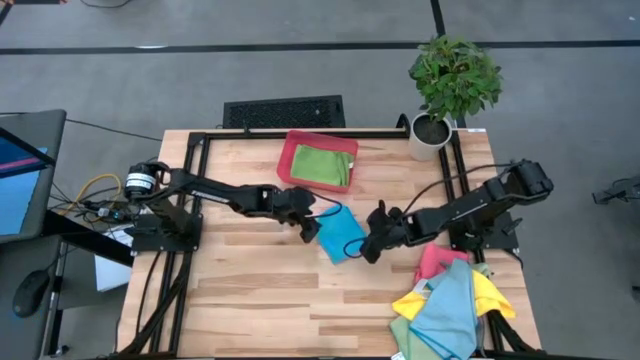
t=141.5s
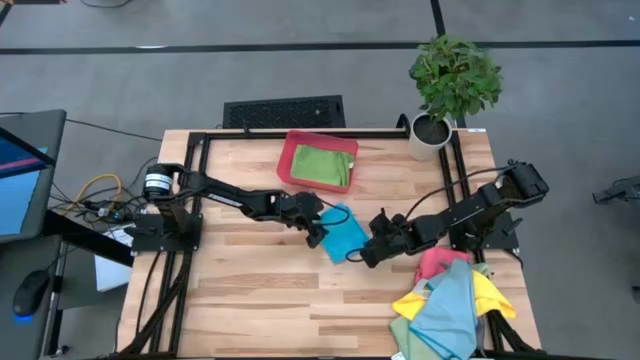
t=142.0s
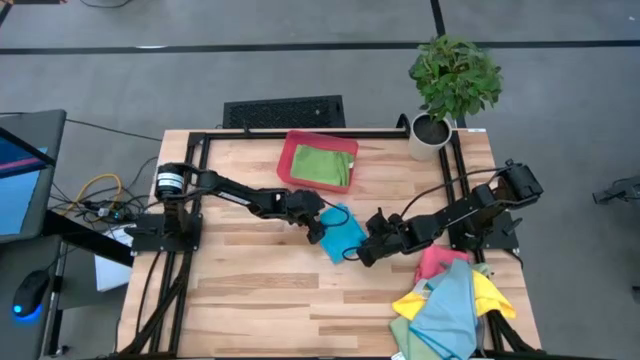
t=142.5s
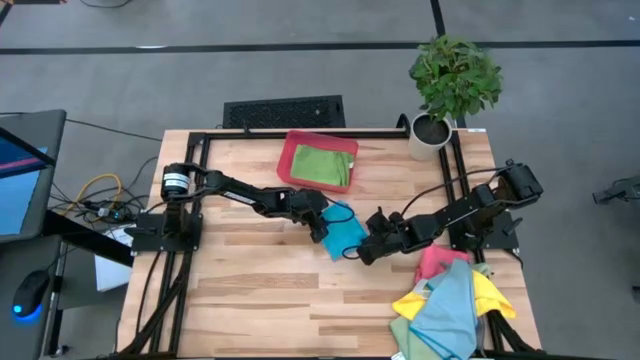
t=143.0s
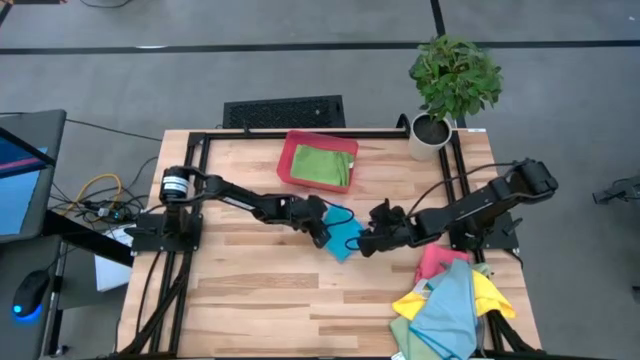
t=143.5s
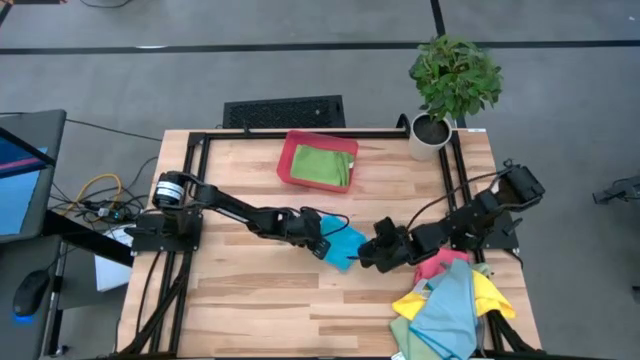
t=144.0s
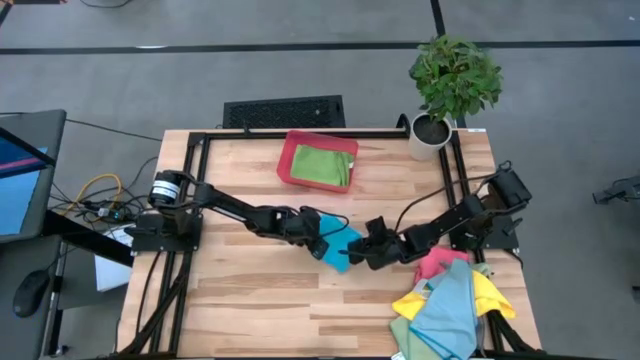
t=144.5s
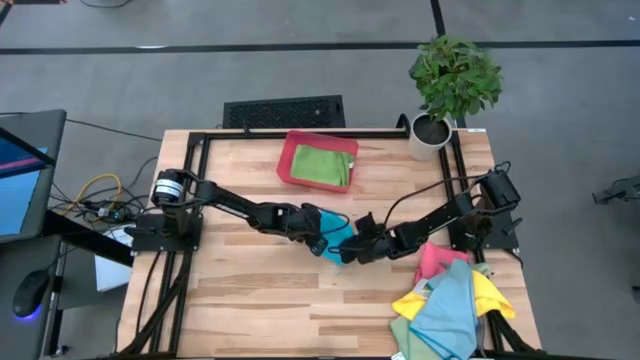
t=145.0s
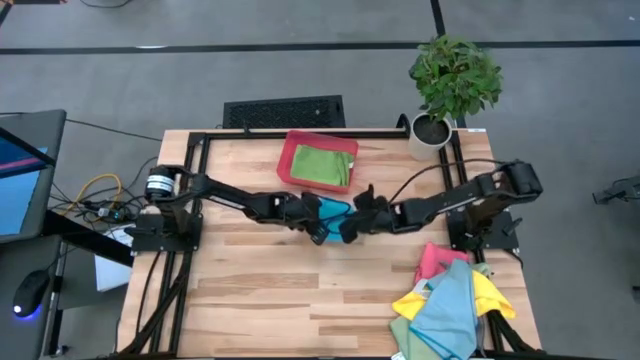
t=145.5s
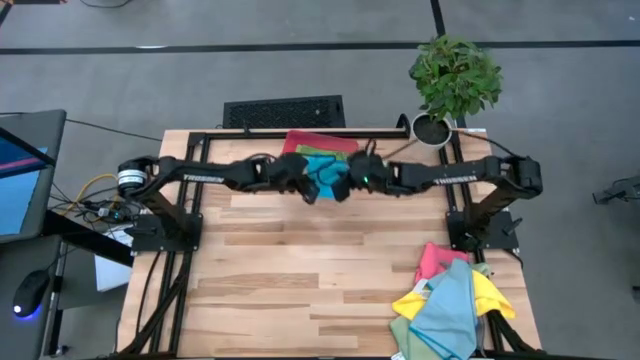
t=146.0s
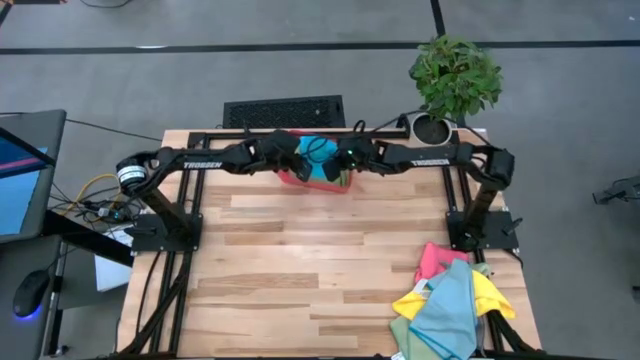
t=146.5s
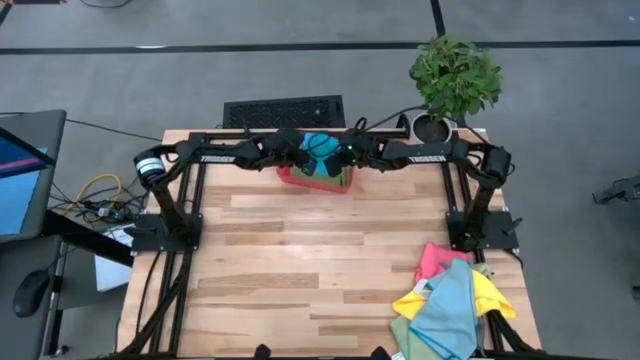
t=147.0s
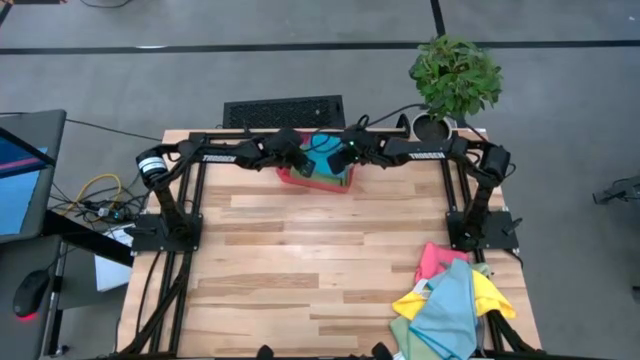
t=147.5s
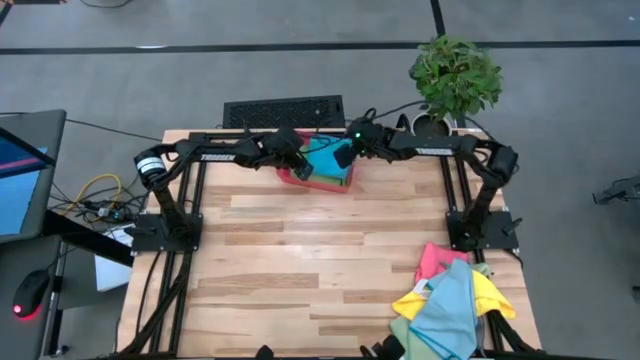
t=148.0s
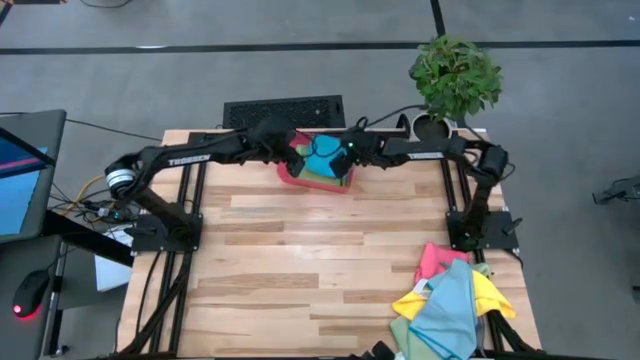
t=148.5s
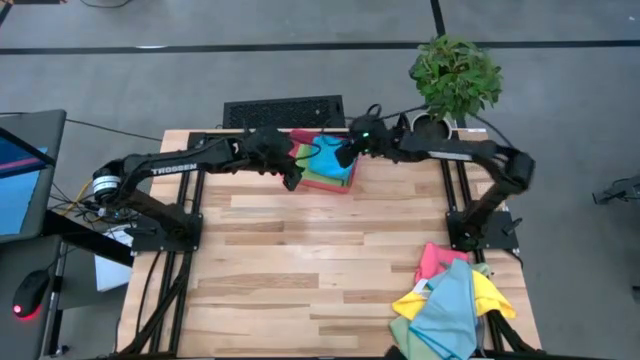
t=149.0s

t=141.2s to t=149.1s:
Task: Fold microfiber towels
Put the blue microfiber cloth into the red bin

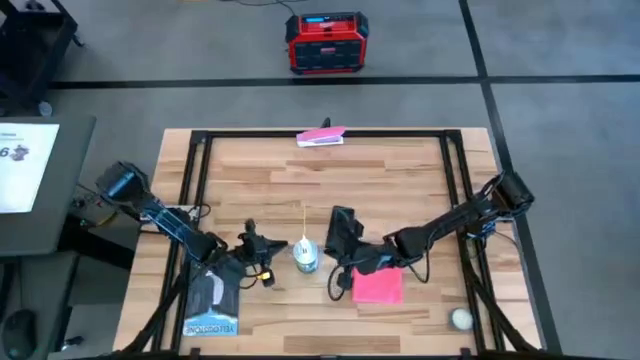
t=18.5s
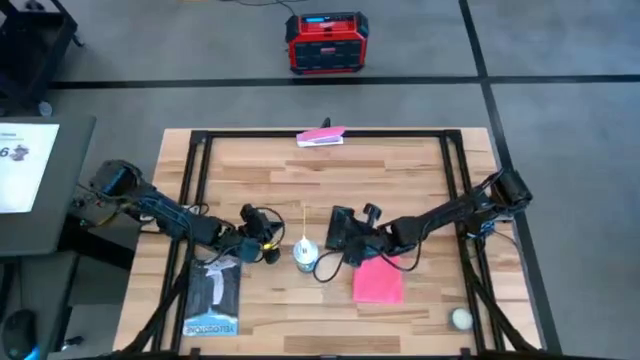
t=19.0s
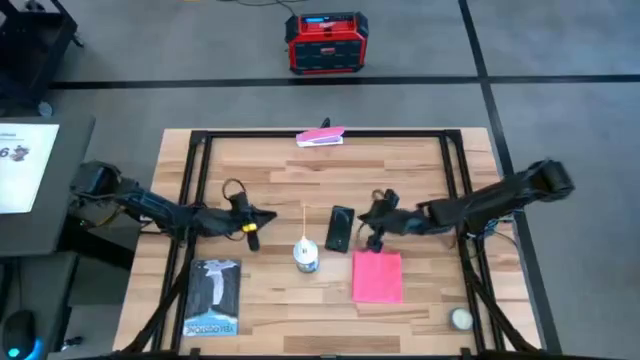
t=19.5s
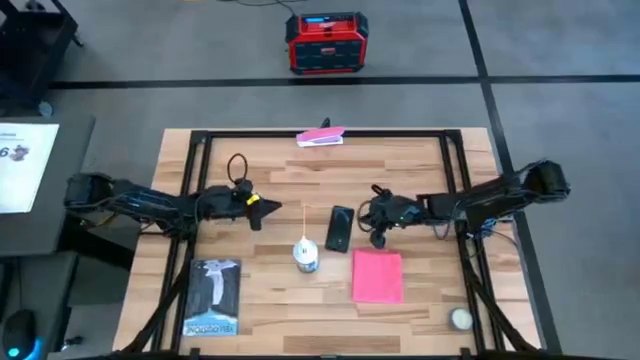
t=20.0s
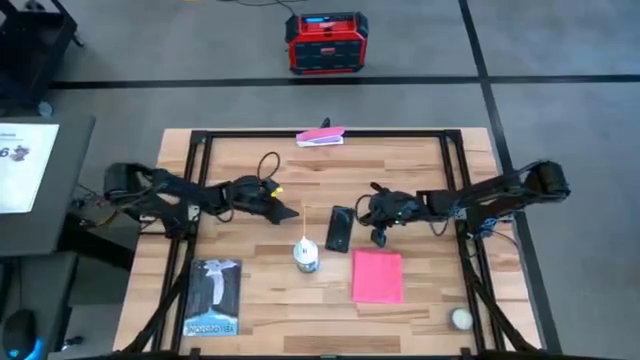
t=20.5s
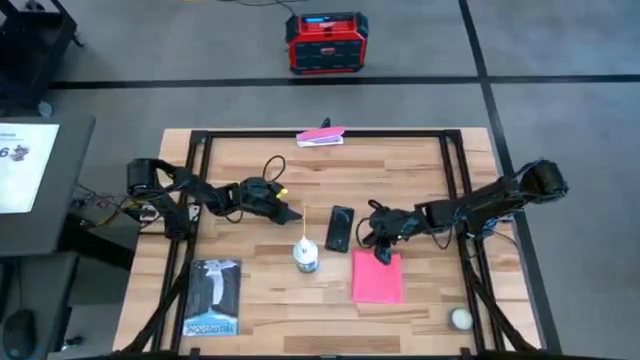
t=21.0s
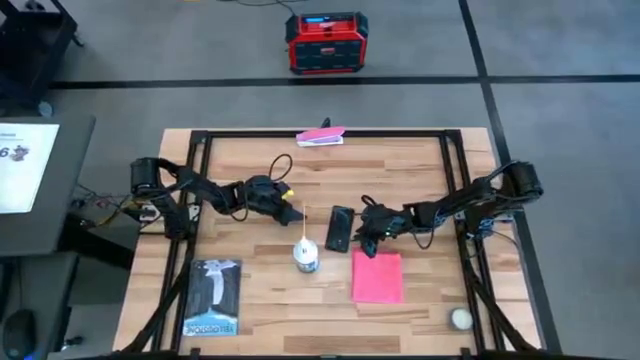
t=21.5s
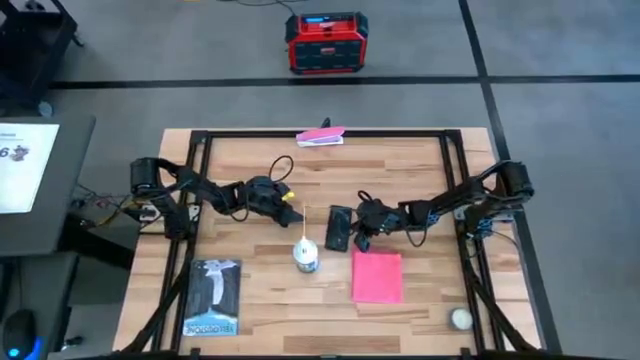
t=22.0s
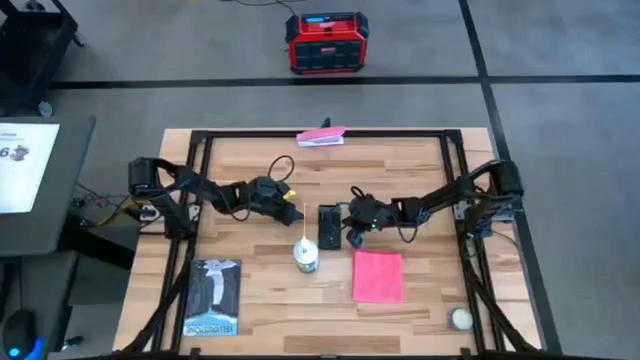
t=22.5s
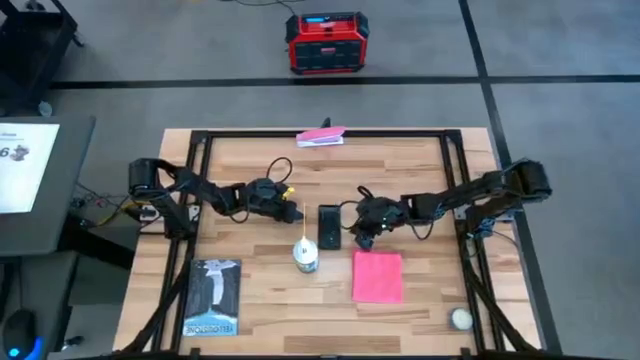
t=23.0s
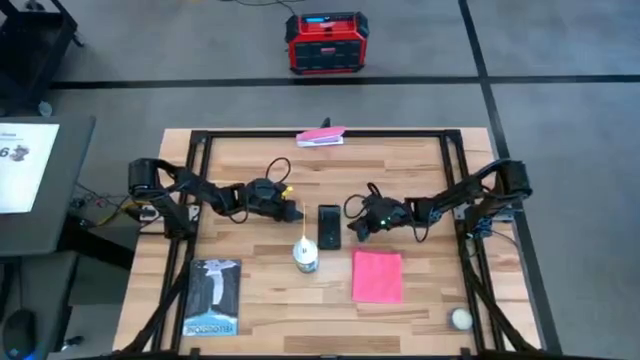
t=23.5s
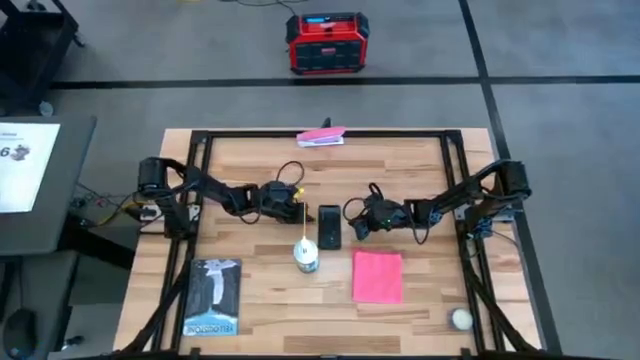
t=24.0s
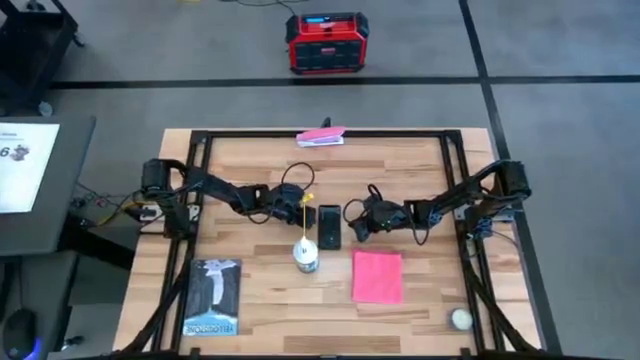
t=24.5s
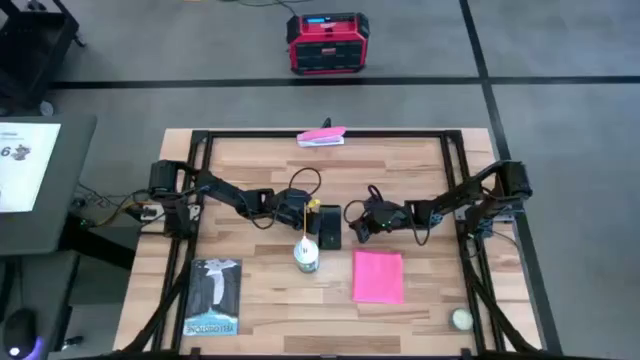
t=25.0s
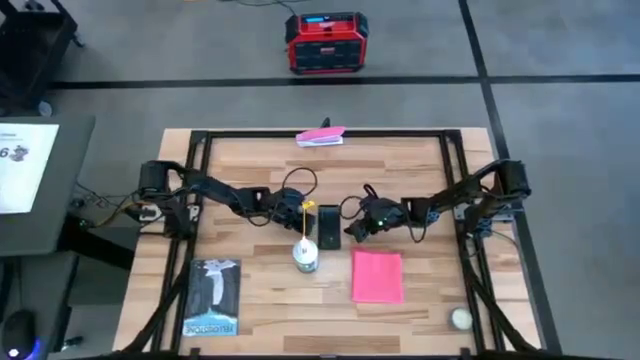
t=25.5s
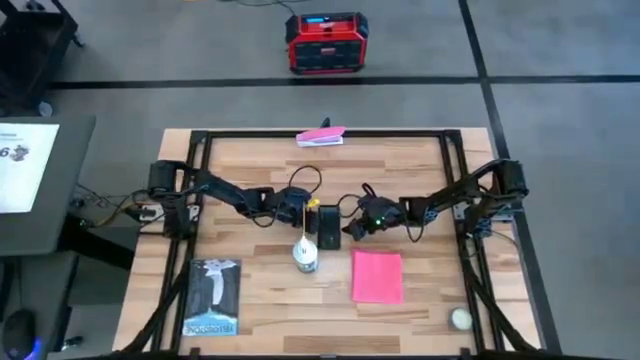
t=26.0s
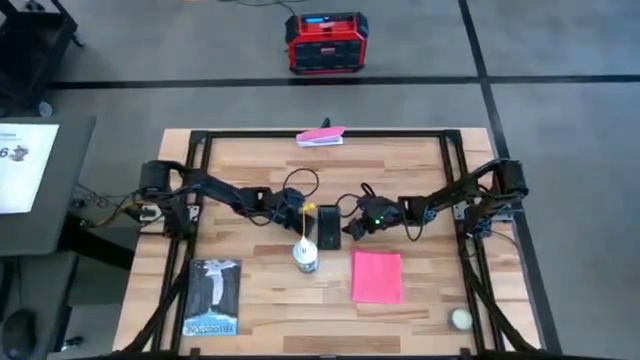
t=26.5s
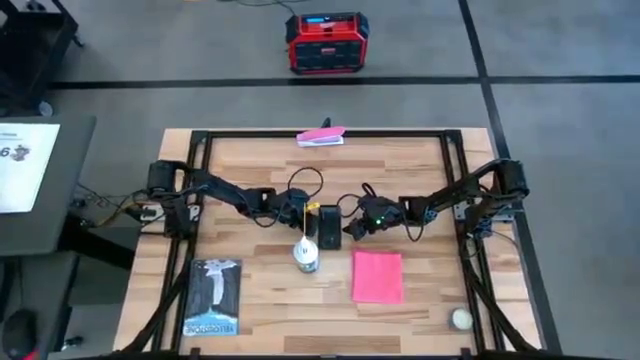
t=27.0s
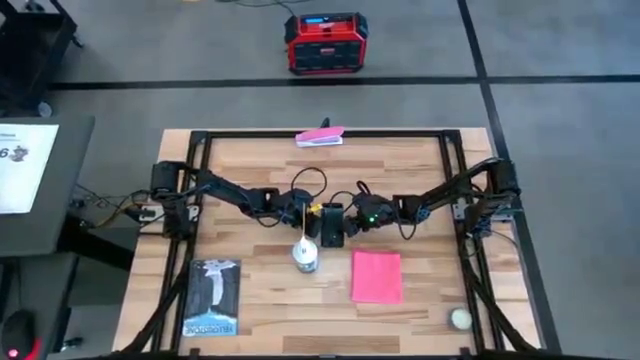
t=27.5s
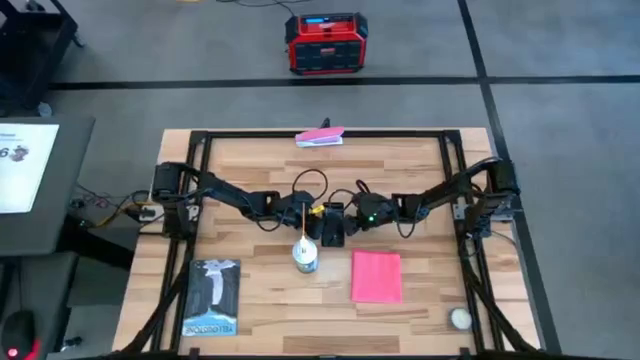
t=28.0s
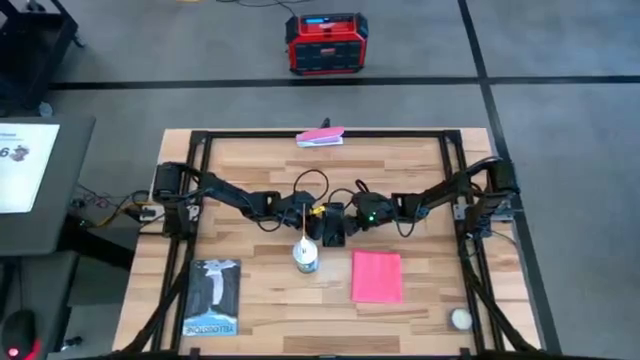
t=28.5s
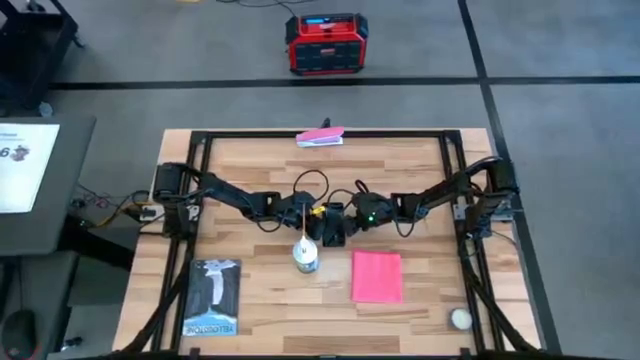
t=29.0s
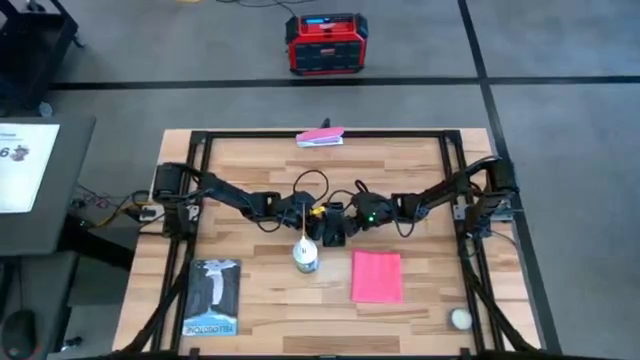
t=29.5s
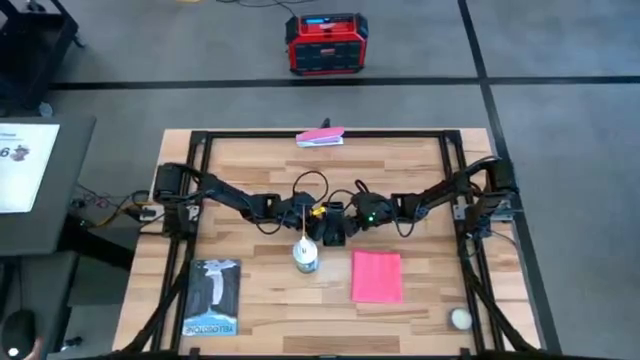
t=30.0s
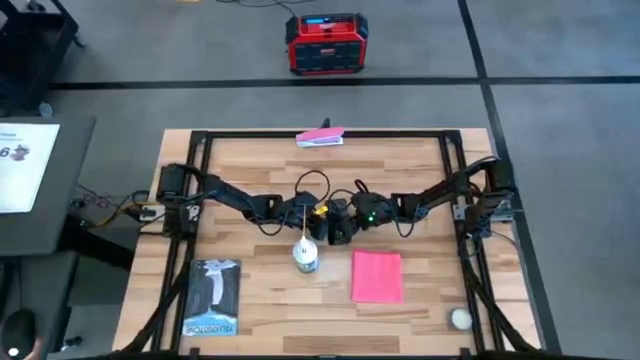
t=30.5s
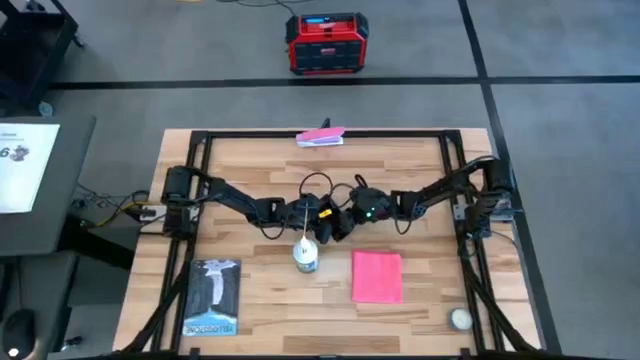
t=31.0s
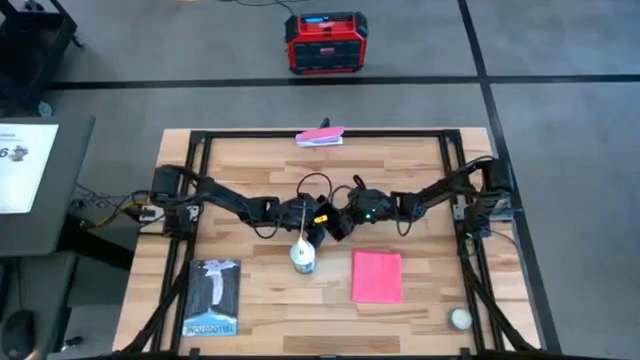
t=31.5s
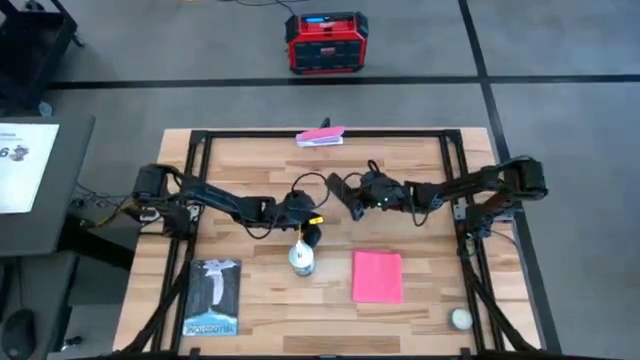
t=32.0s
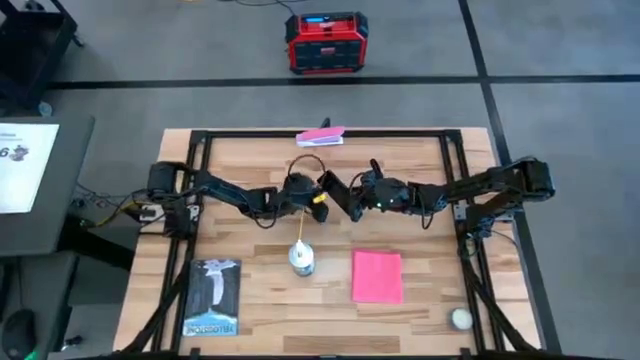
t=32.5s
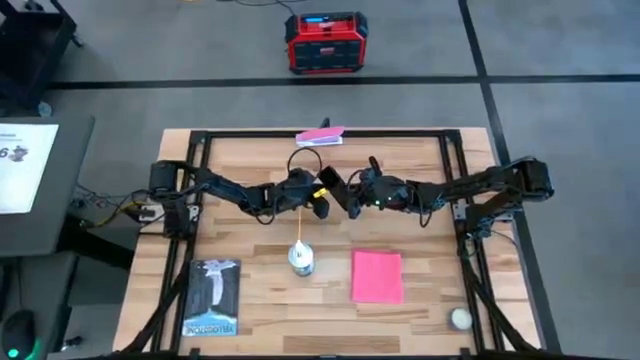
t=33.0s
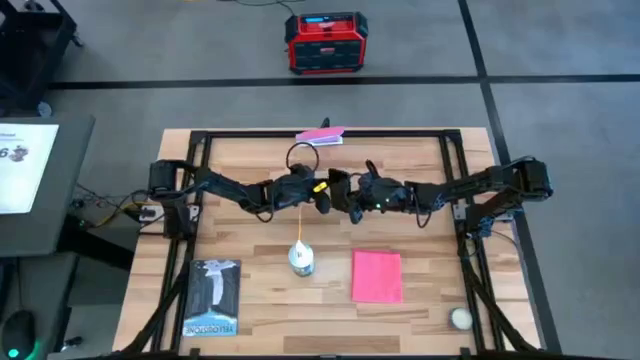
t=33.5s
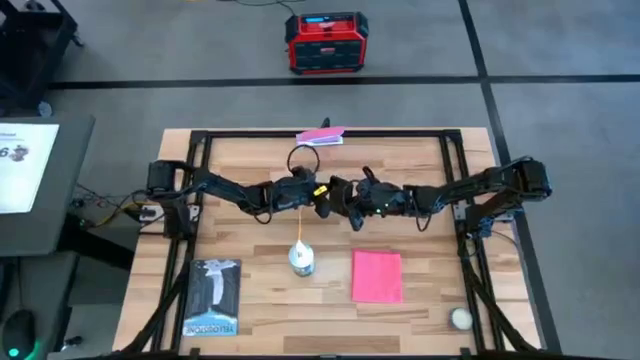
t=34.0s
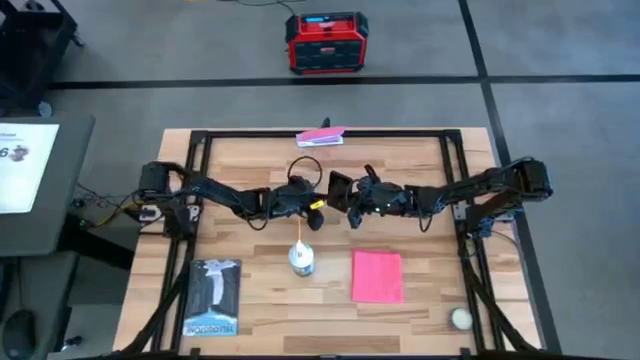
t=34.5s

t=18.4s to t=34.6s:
Task: Apply microfiber cloth
Prepare the black cellphone
